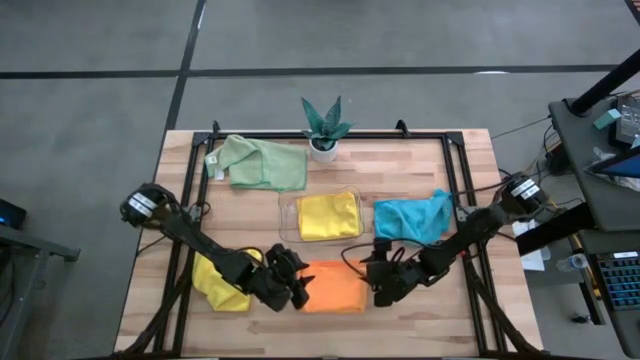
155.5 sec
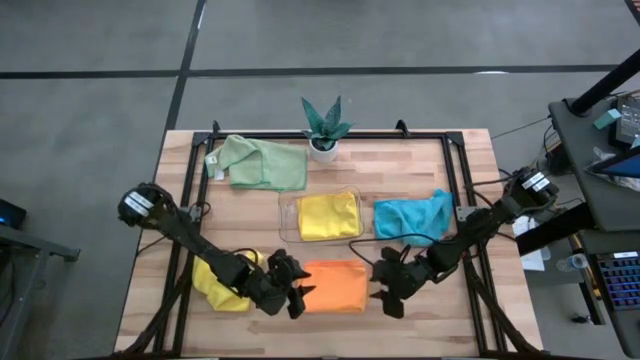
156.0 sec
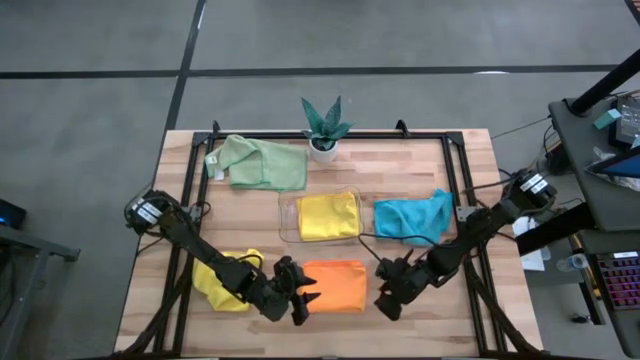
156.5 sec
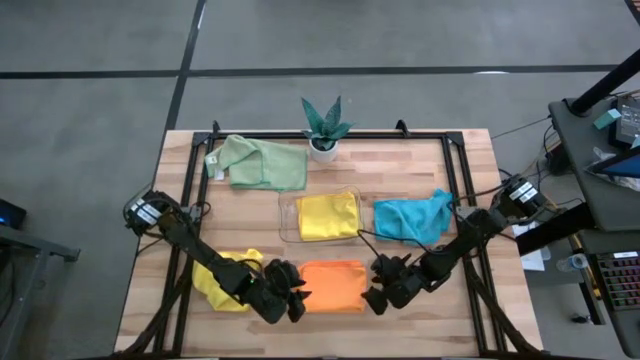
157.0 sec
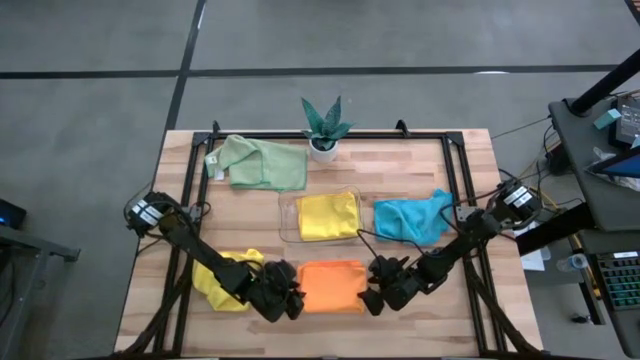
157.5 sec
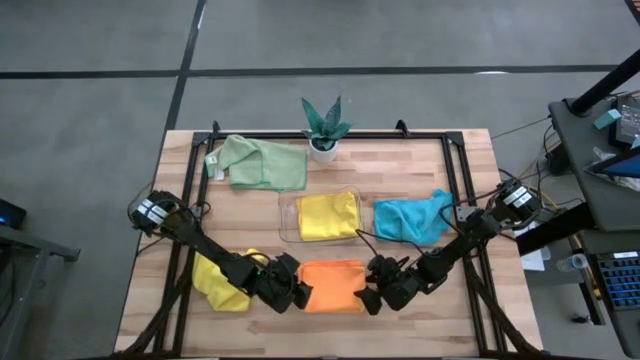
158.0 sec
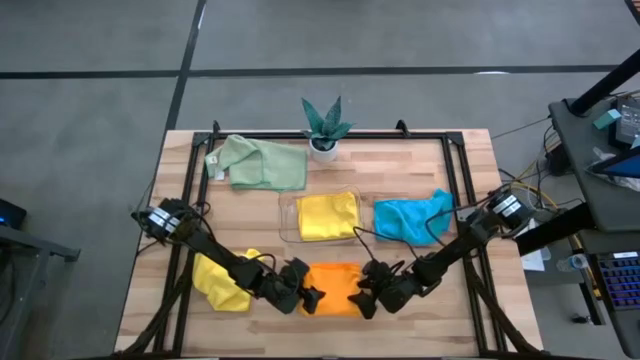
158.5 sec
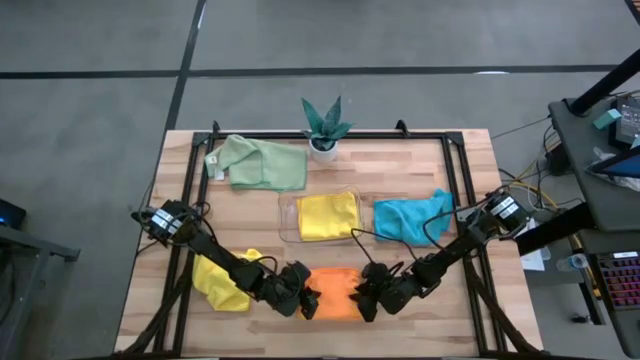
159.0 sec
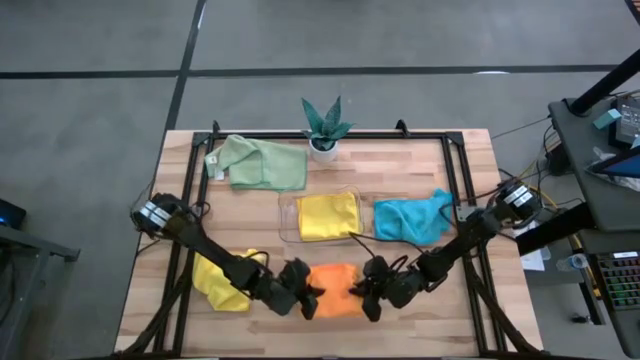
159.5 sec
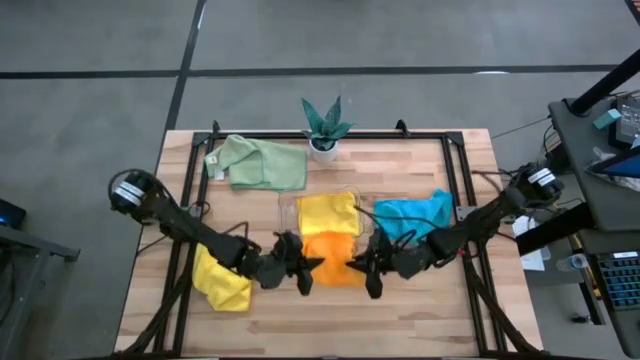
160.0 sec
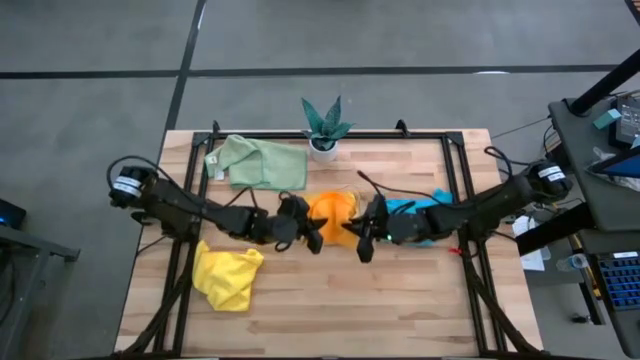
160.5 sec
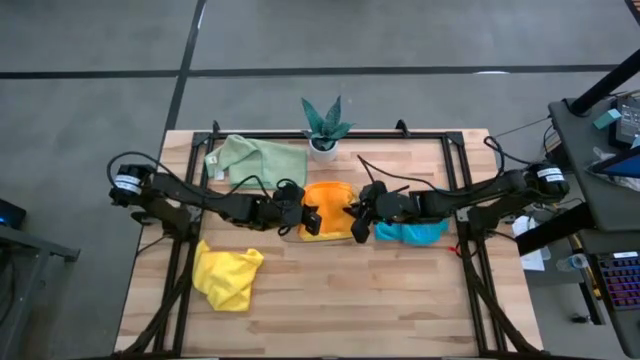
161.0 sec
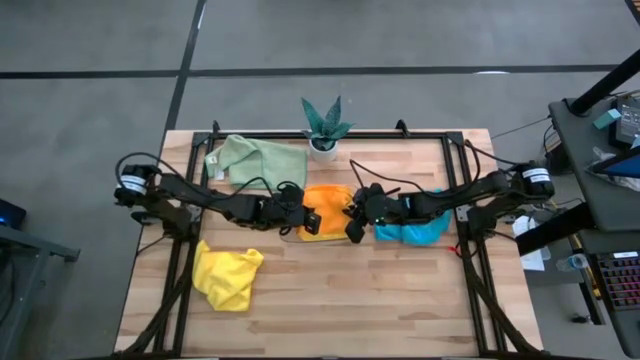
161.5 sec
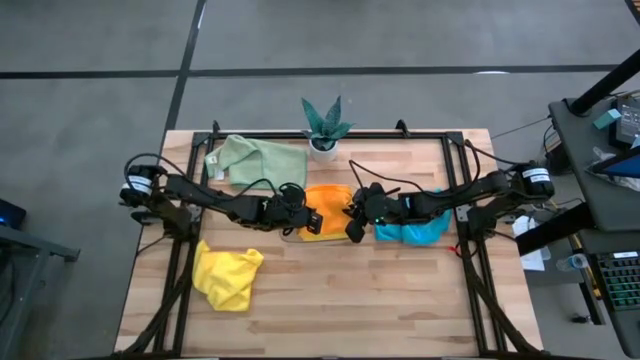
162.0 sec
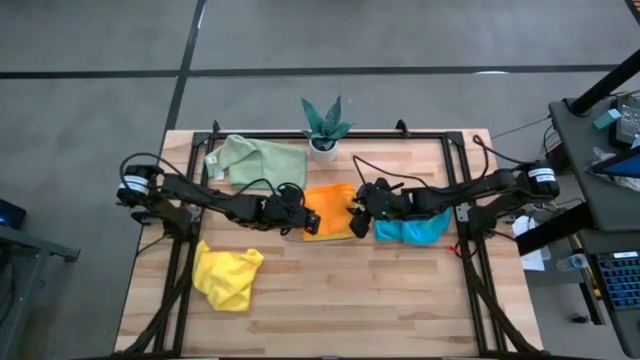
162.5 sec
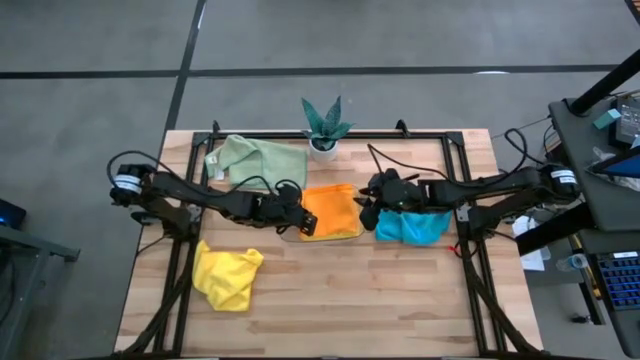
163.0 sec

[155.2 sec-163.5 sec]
Task: Fold microfiber towels
Put the folded orange microfiber towel into the transparent bin
